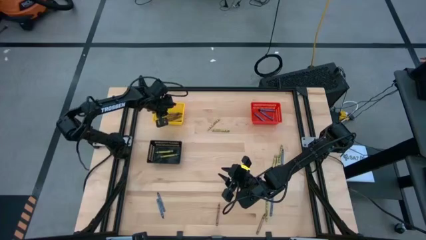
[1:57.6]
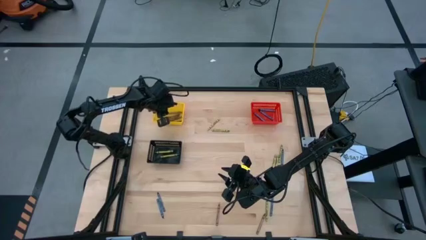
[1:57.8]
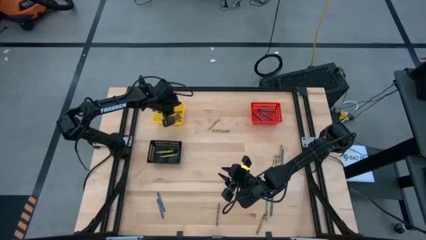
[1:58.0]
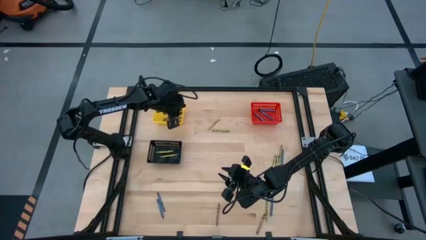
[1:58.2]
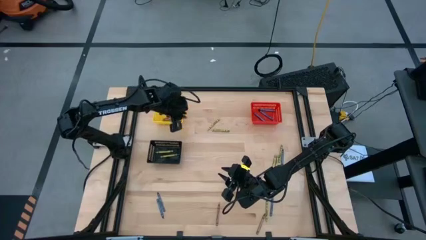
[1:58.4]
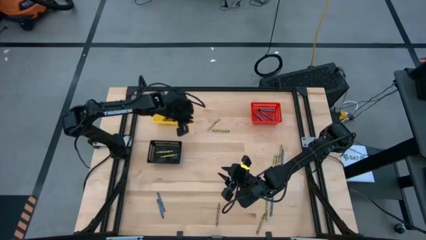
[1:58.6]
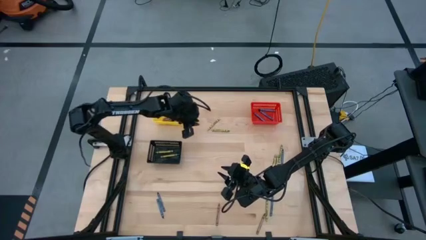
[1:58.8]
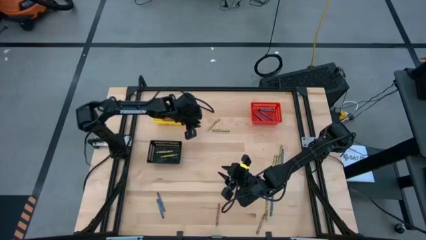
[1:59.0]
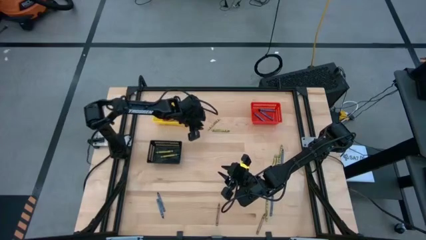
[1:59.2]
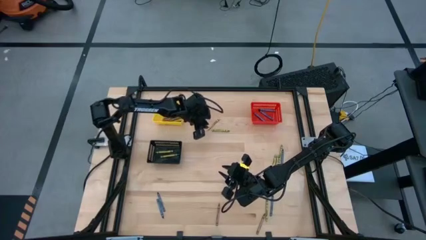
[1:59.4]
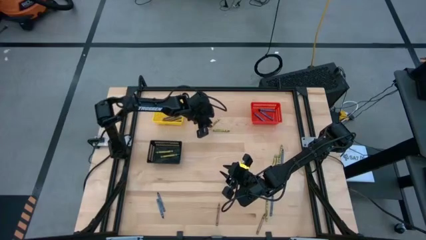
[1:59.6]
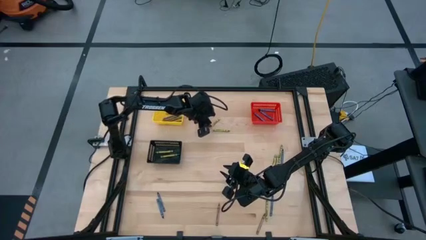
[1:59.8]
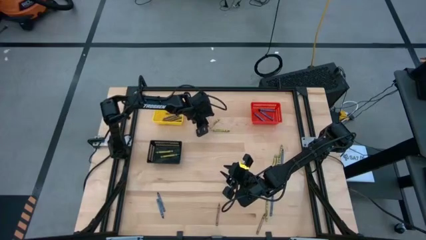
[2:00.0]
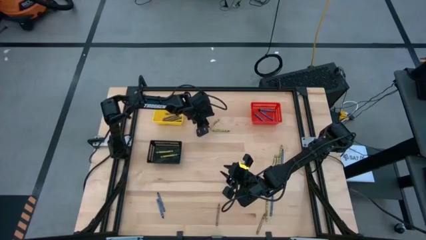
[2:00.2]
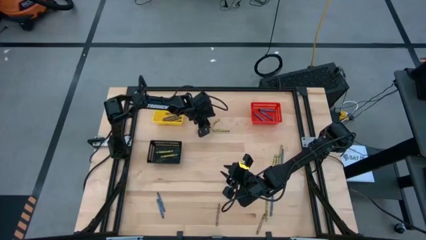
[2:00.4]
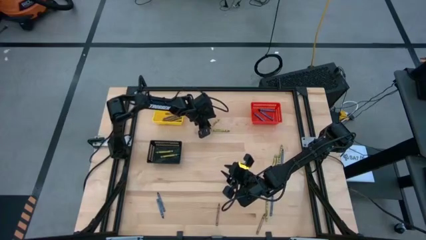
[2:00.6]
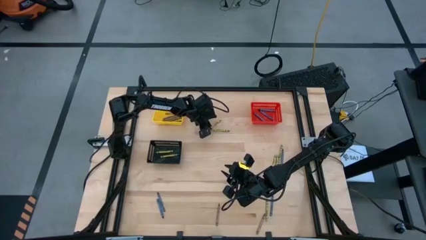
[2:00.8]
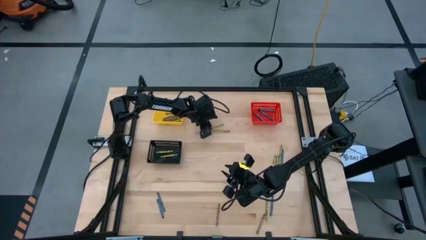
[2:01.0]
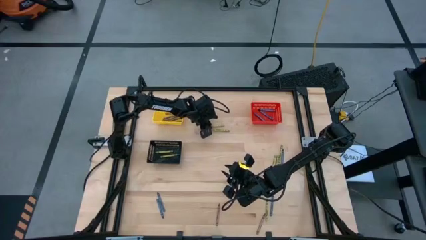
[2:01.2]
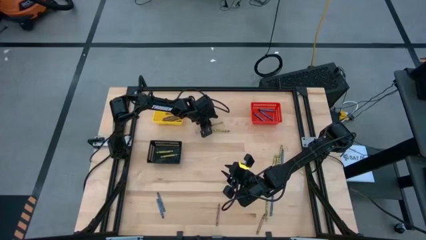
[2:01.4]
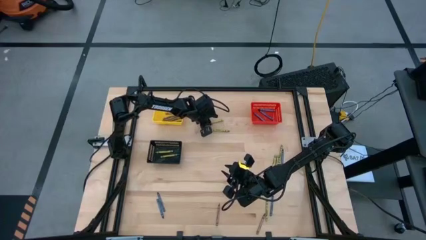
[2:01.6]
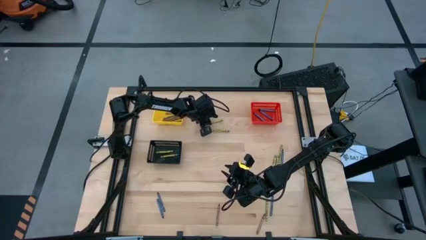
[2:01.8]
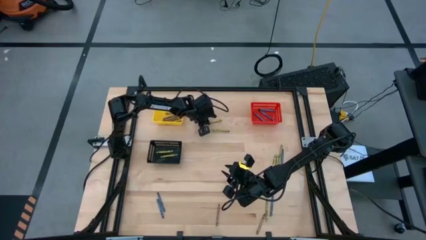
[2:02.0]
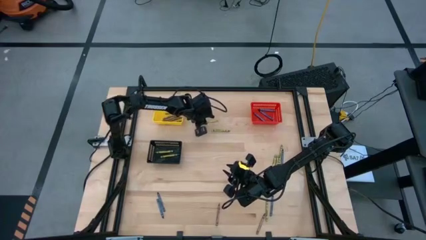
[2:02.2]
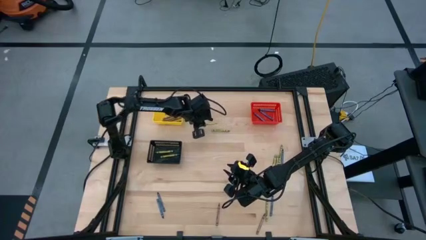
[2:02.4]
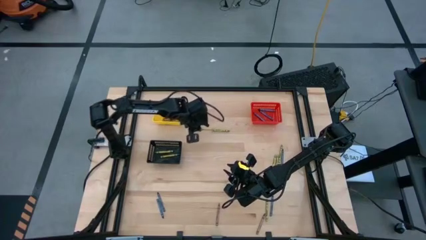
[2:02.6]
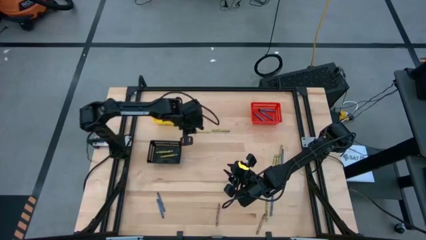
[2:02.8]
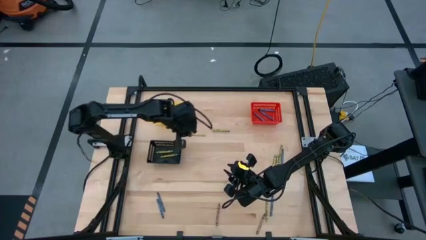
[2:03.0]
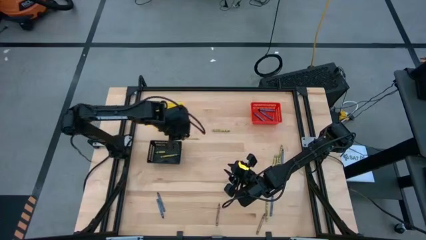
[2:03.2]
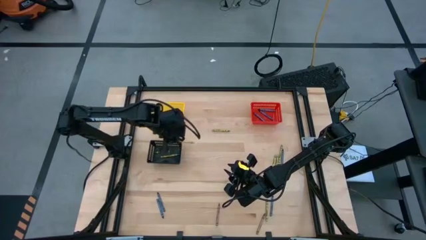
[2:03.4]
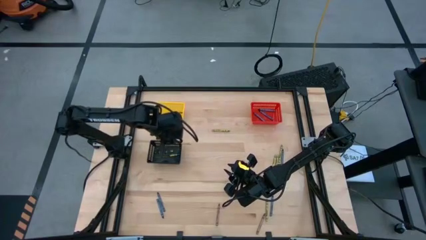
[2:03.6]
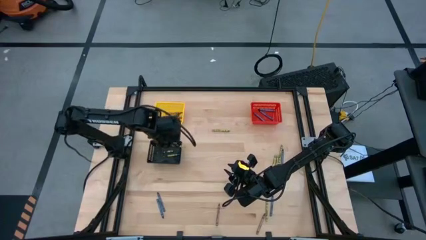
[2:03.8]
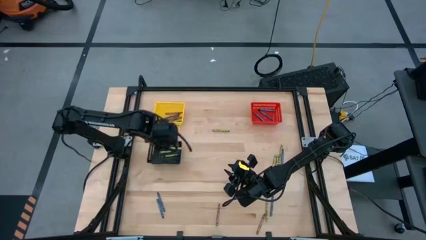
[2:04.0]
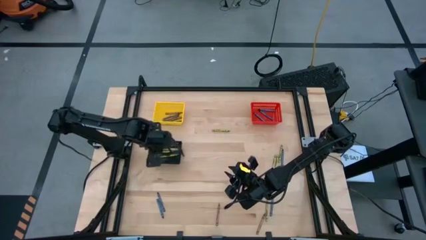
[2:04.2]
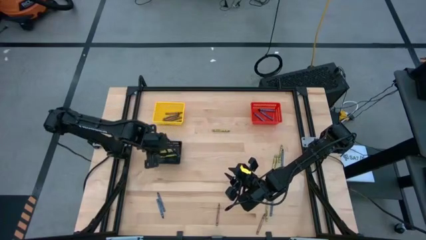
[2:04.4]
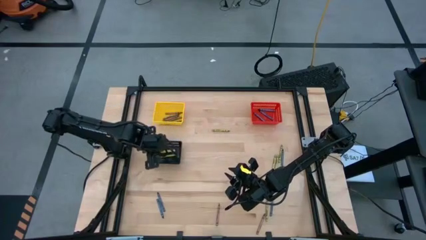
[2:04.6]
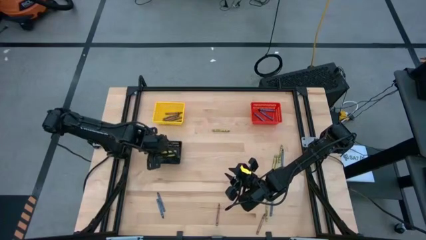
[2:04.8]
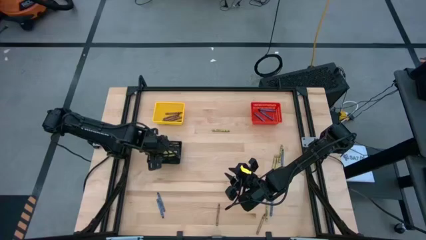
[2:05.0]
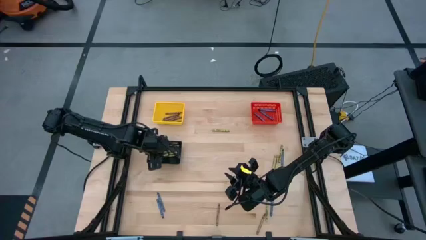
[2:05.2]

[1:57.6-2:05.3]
Task: Sort crayons
Put the light green crayon into the black bin

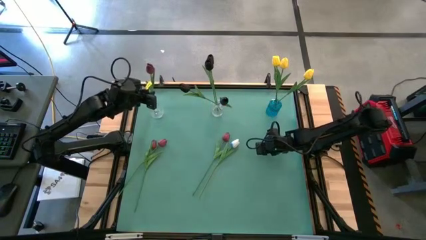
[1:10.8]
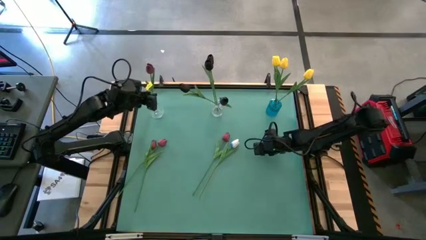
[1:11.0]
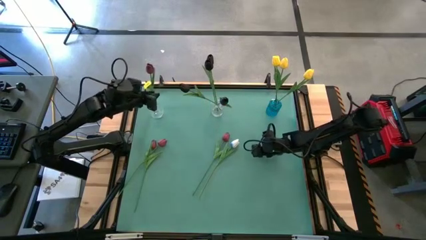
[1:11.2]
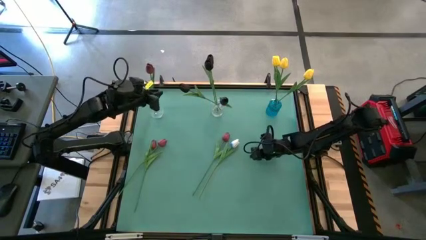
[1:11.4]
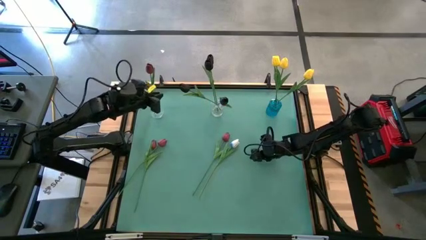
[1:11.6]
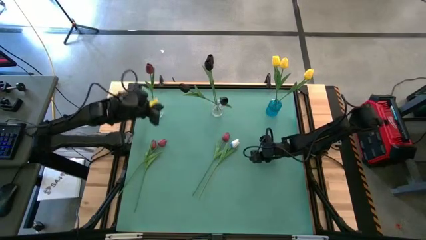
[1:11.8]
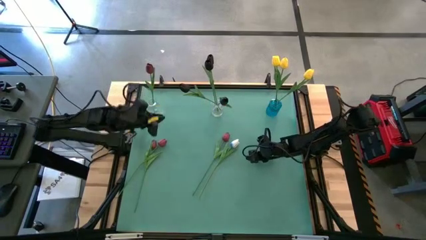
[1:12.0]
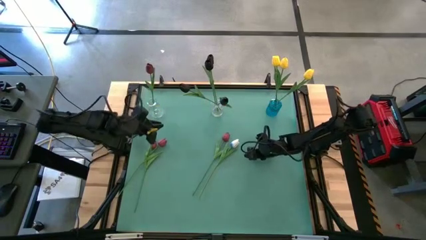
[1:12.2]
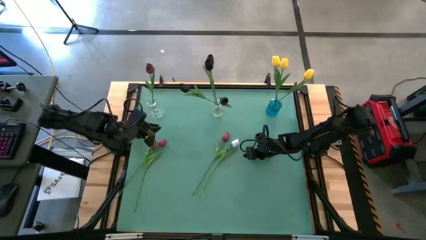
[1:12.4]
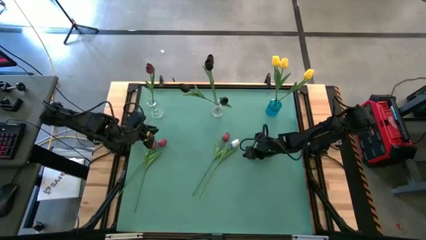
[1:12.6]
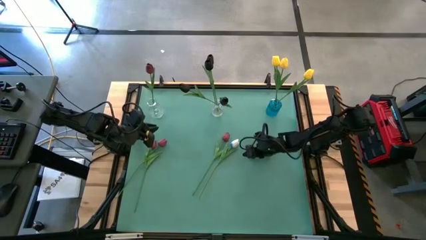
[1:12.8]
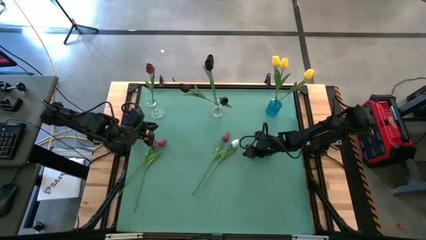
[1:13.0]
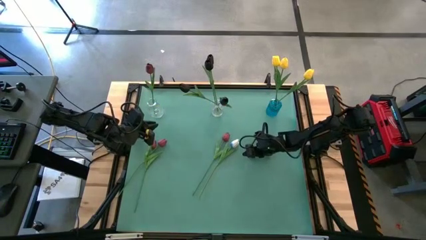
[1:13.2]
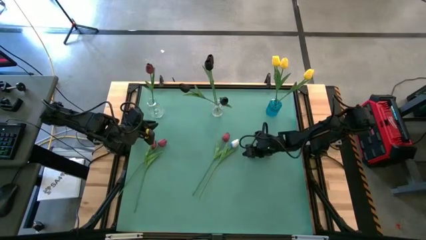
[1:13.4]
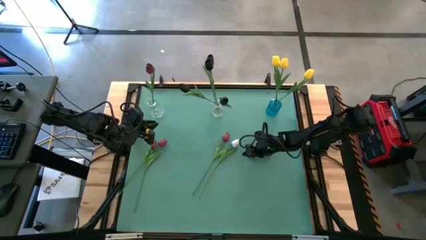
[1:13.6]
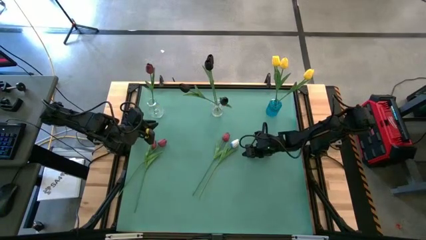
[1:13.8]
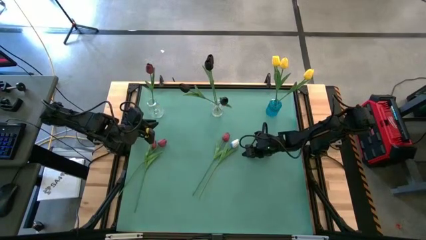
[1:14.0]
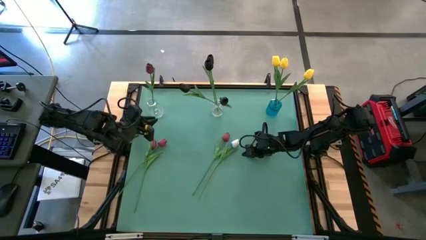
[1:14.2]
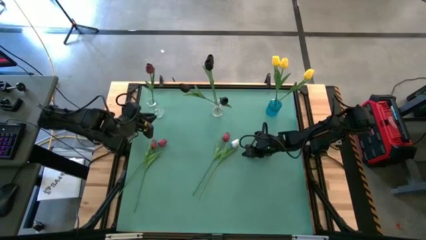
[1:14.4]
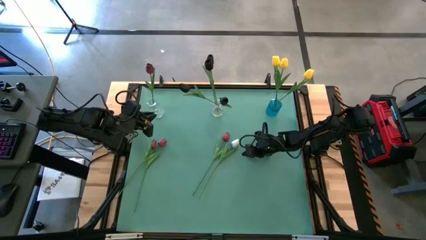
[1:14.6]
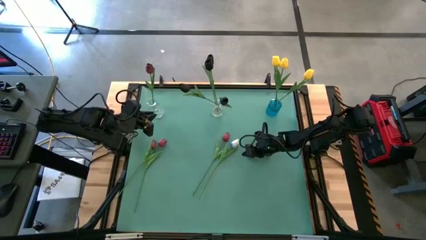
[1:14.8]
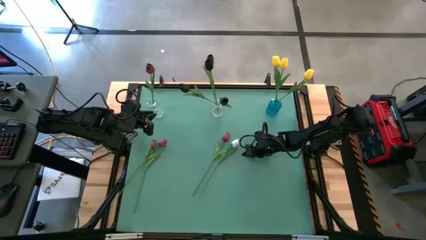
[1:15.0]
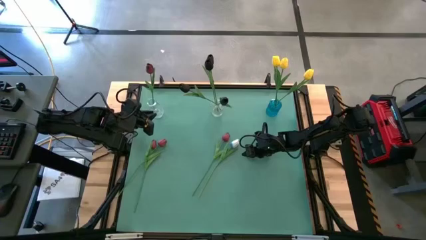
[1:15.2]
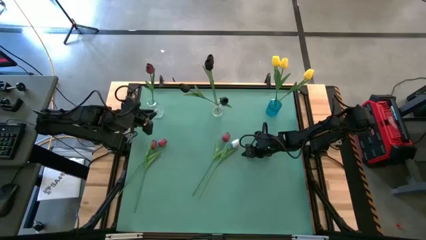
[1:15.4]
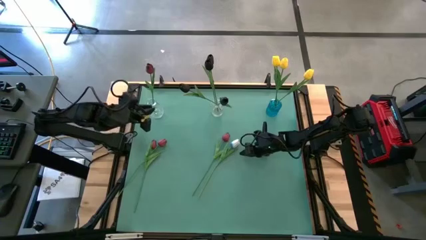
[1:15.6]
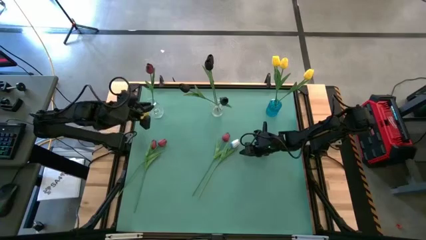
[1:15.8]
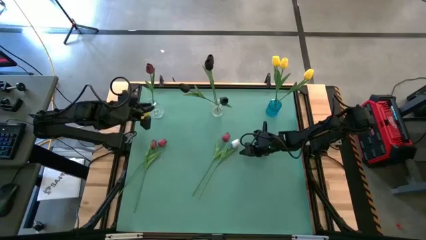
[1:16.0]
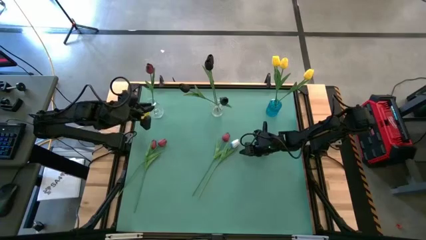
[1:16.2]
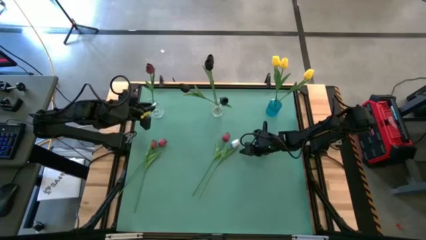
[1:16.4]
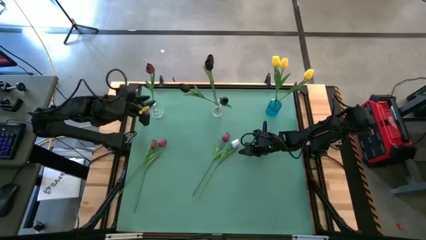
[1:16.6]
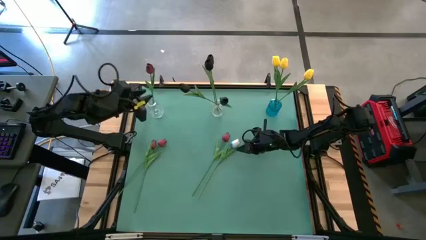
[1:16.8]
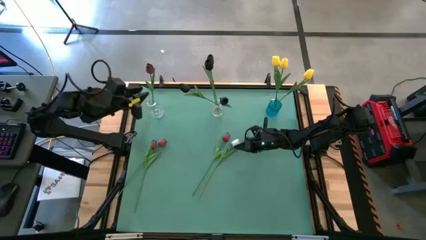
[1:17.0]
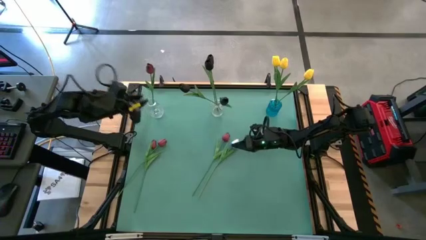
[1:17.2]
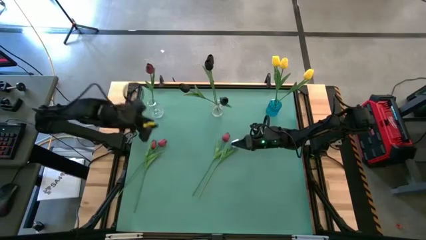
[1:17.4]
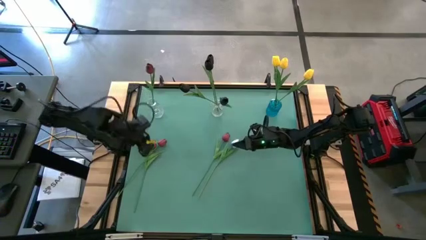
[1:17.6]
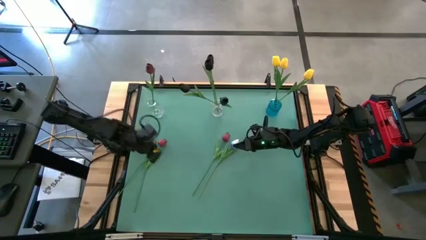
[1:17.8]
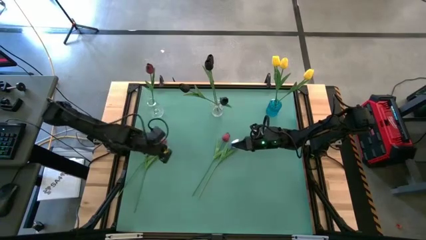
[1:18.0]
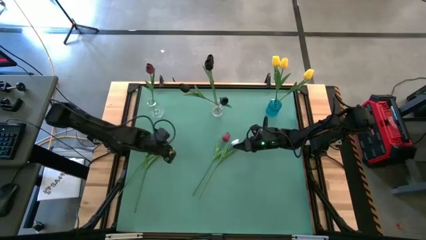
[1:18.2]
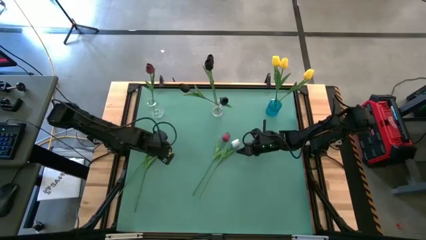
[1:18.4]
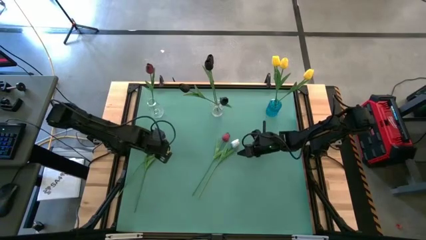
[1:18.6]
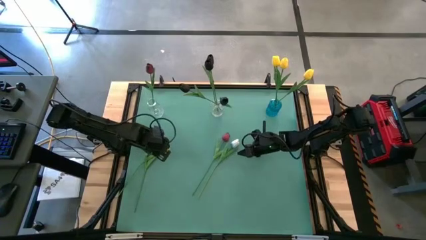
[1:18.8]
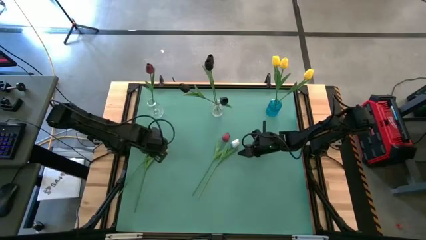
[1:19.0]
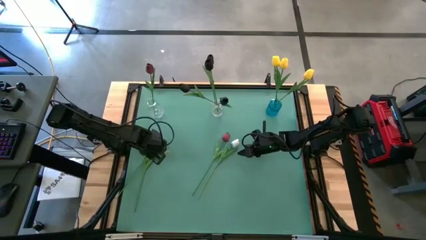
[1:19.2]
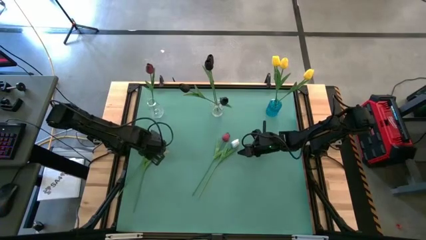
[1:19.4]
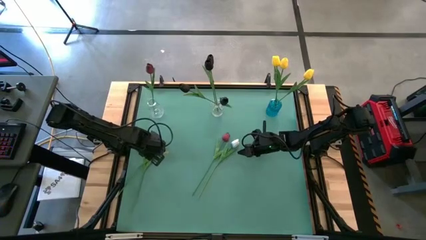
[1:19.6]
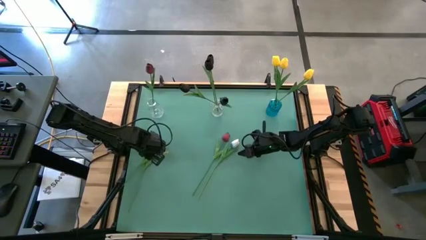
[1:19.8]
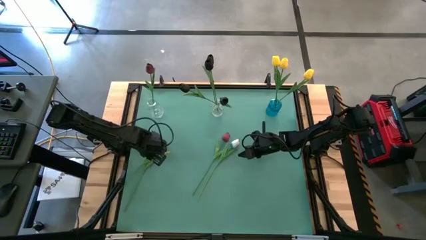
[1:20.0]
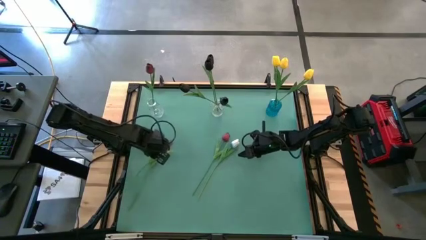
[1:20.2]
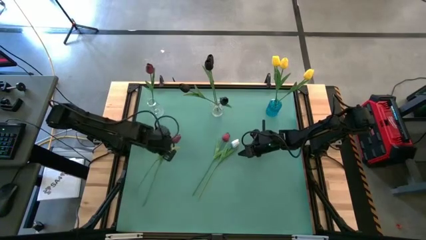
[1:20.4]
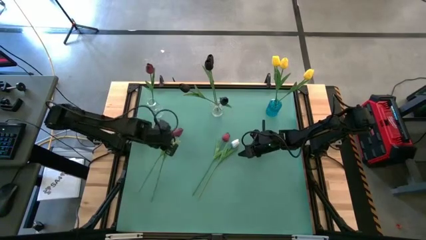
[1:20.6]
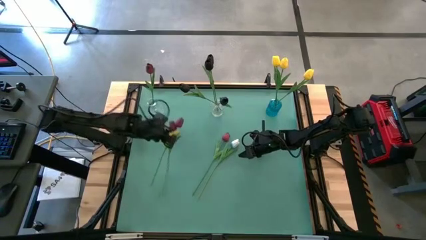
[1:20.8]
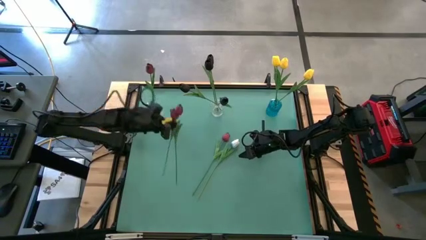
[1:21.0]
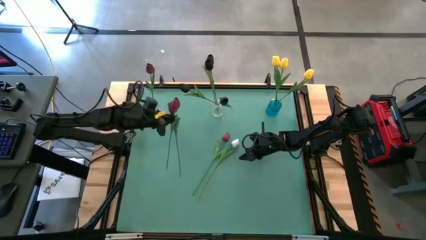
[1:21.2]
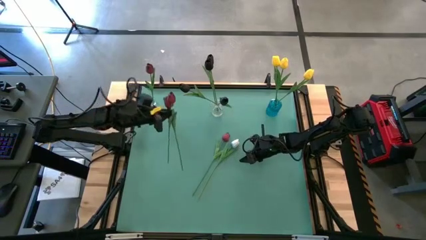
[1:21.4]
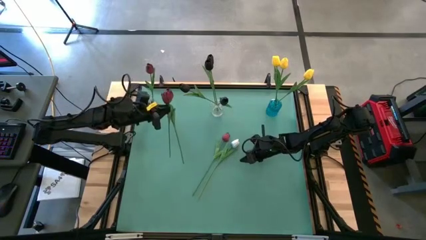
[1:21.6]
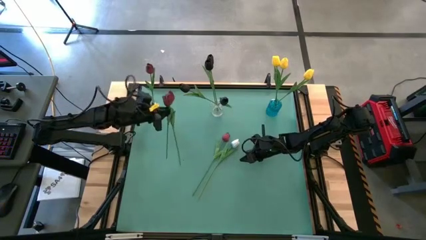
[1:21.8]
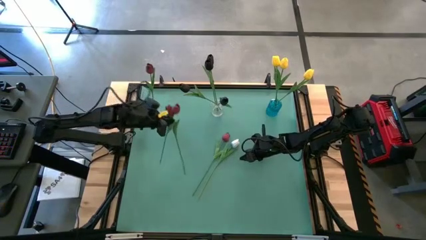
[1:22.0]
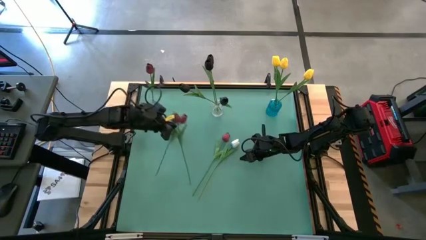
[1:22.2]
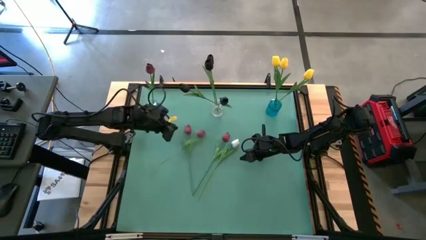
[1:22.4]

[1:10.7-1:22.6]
Task: Sort flowers into vase by color
Put the red tulip into the left transparent vase
